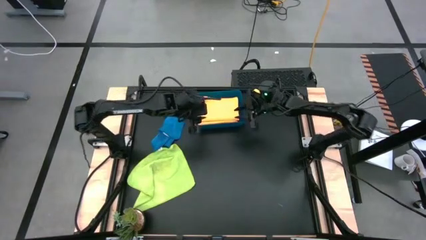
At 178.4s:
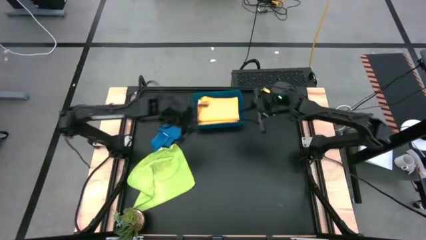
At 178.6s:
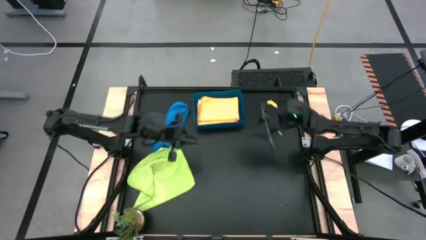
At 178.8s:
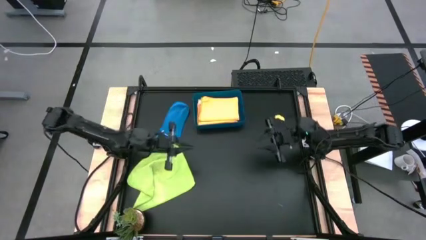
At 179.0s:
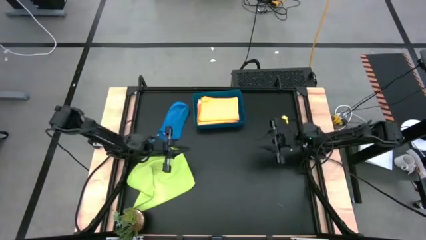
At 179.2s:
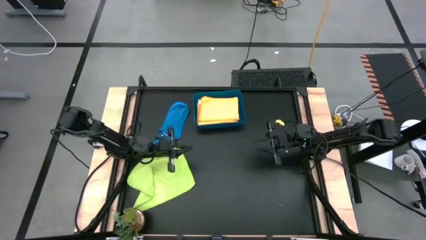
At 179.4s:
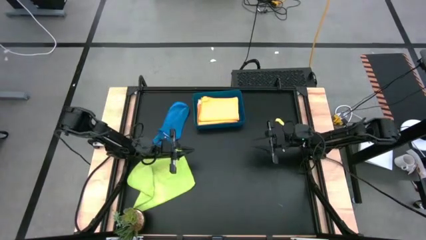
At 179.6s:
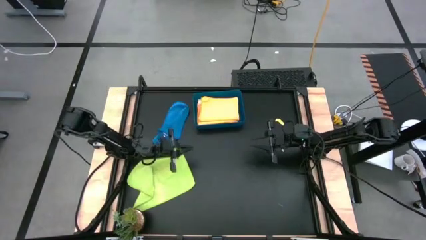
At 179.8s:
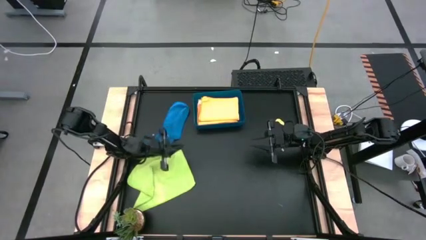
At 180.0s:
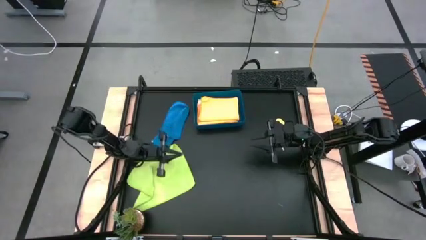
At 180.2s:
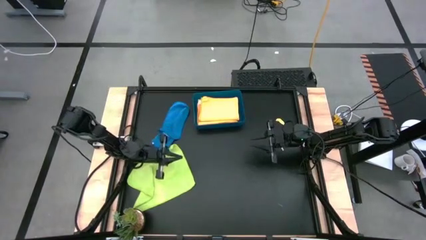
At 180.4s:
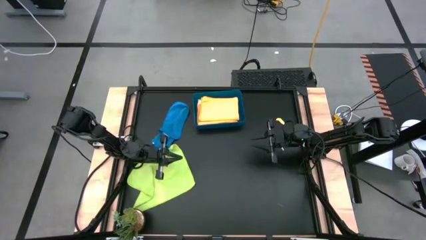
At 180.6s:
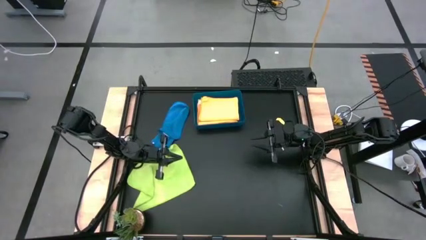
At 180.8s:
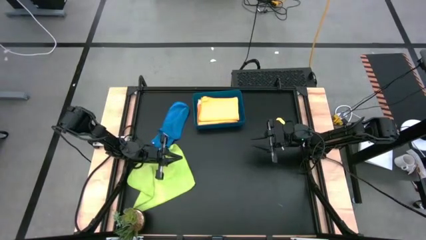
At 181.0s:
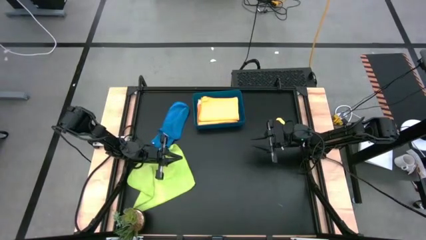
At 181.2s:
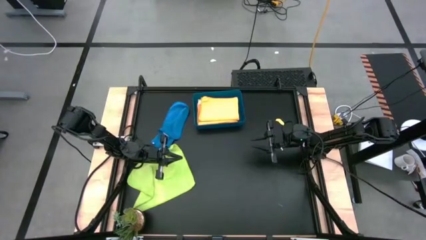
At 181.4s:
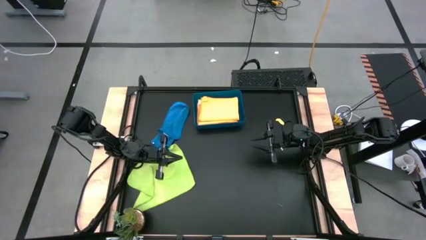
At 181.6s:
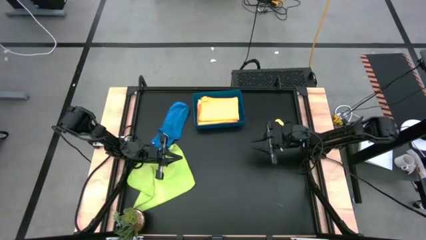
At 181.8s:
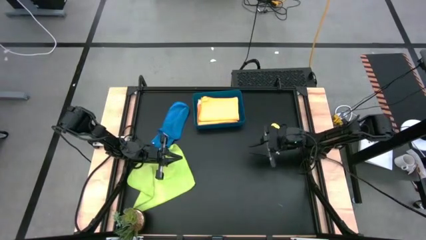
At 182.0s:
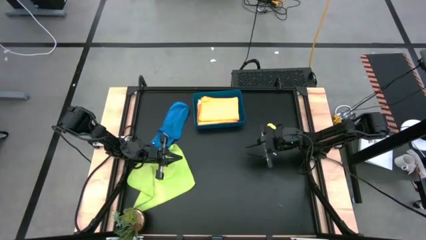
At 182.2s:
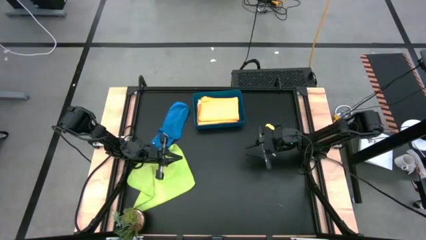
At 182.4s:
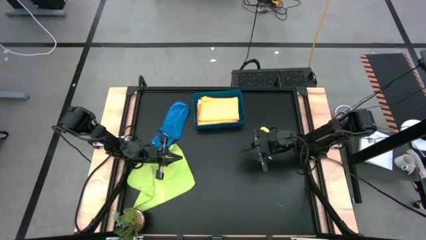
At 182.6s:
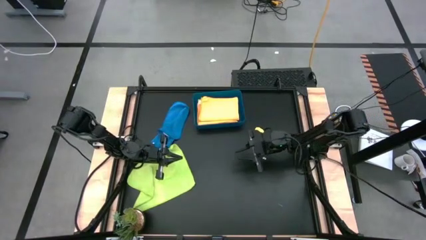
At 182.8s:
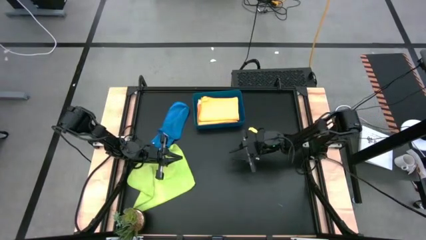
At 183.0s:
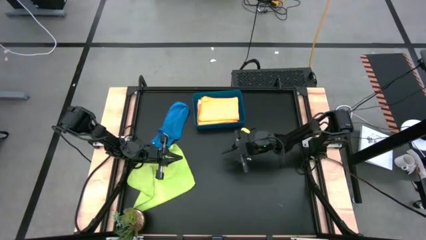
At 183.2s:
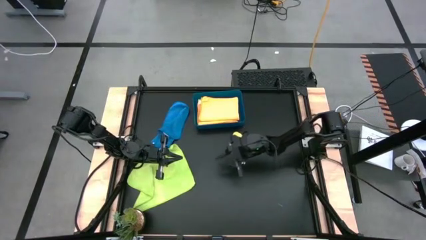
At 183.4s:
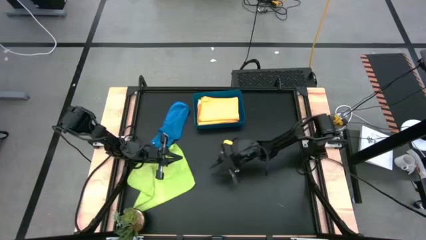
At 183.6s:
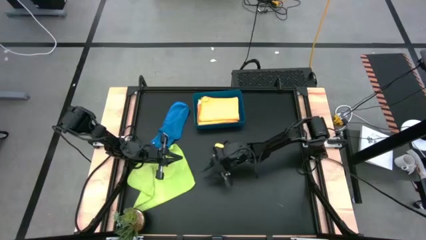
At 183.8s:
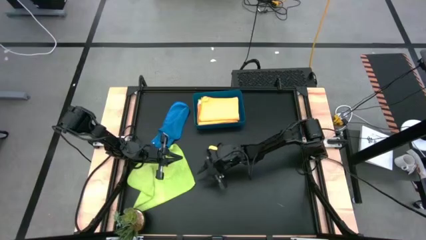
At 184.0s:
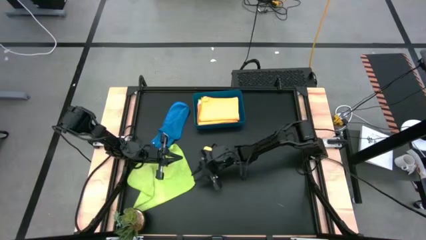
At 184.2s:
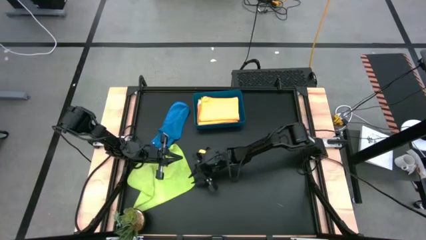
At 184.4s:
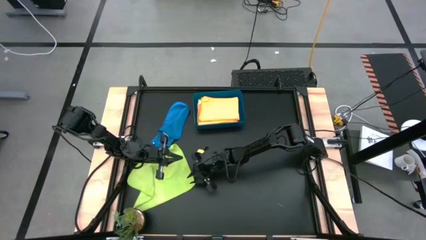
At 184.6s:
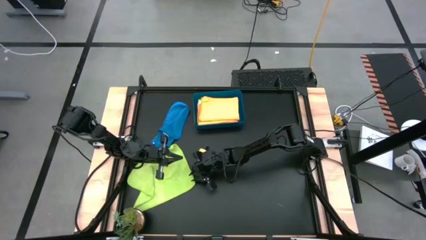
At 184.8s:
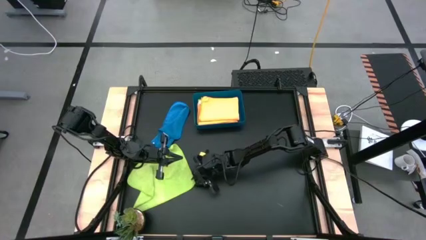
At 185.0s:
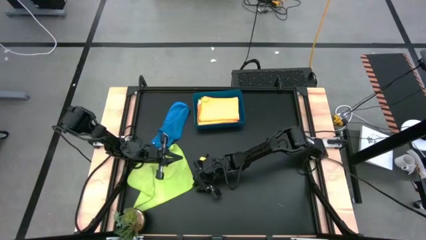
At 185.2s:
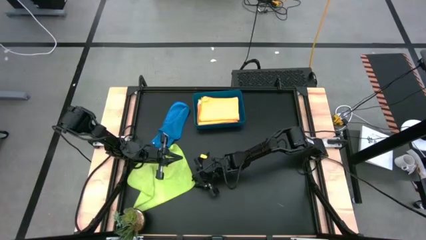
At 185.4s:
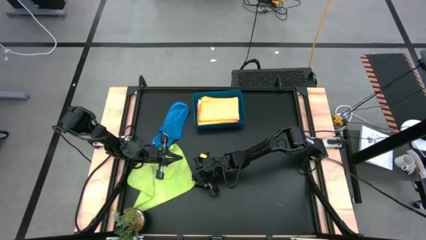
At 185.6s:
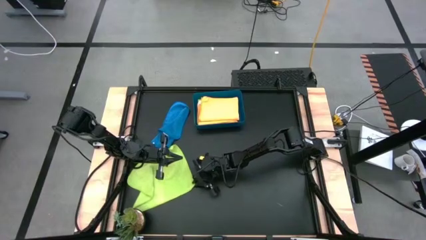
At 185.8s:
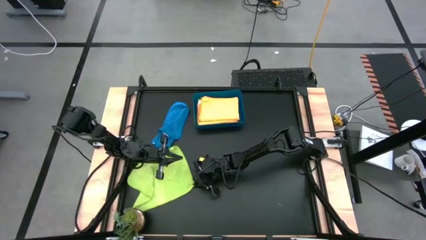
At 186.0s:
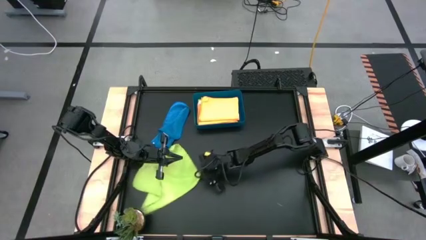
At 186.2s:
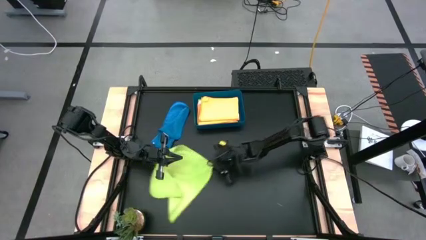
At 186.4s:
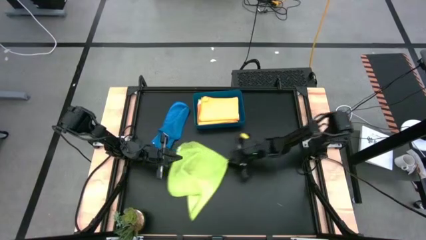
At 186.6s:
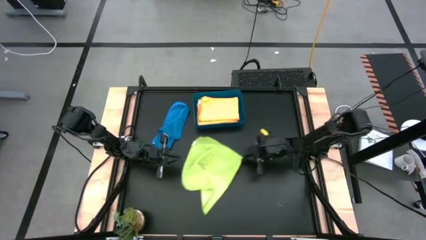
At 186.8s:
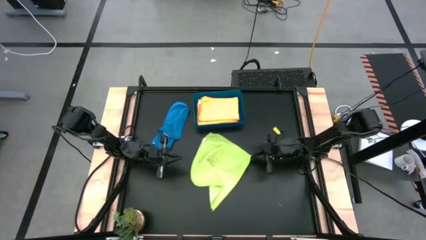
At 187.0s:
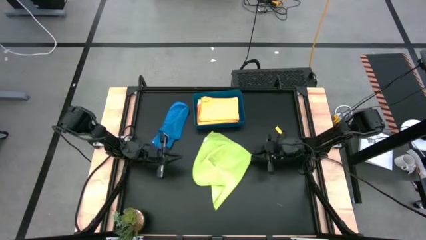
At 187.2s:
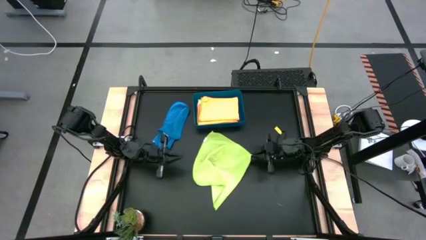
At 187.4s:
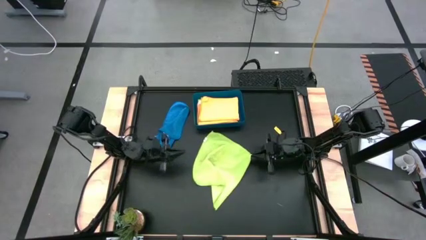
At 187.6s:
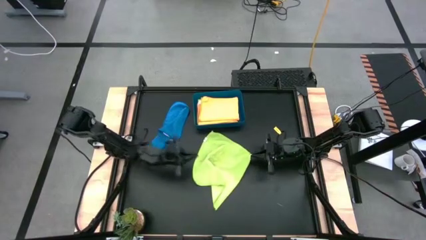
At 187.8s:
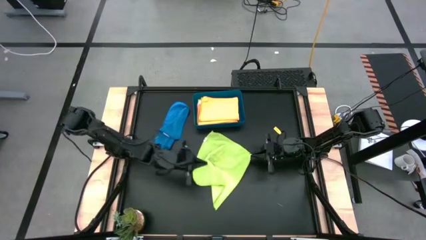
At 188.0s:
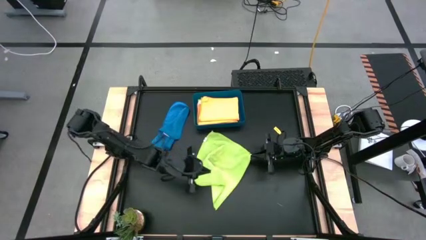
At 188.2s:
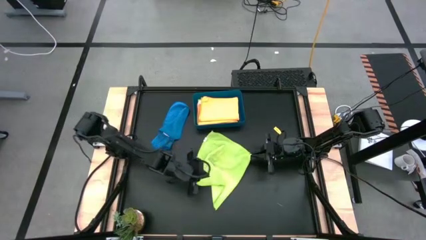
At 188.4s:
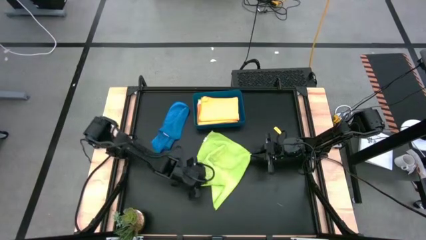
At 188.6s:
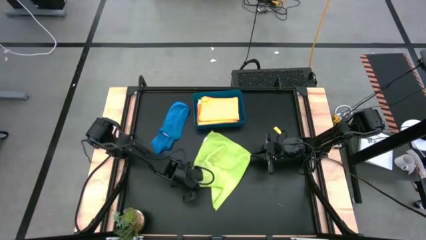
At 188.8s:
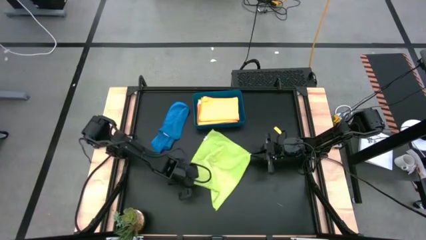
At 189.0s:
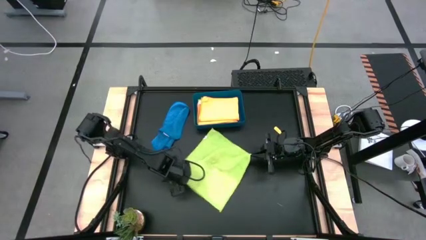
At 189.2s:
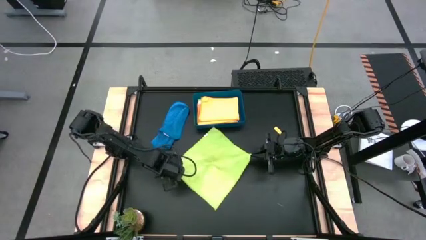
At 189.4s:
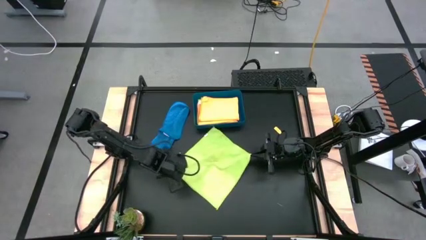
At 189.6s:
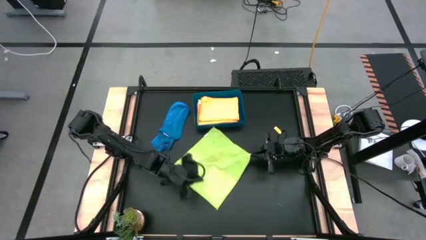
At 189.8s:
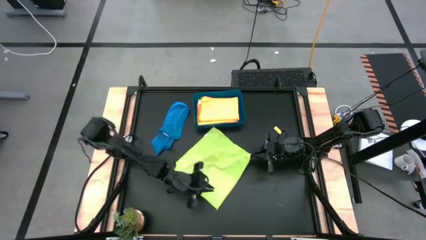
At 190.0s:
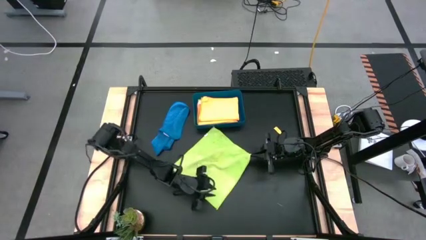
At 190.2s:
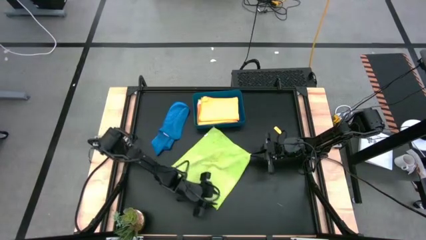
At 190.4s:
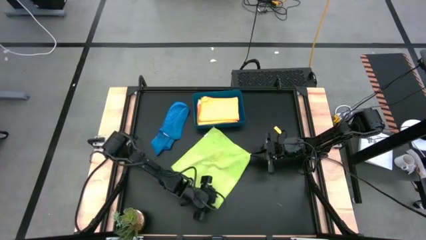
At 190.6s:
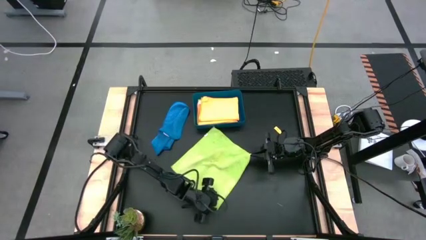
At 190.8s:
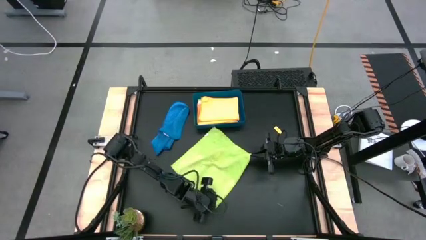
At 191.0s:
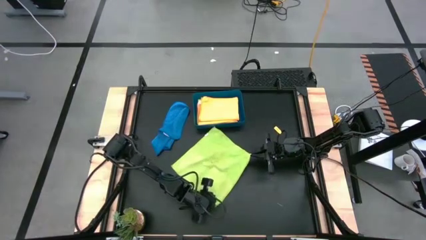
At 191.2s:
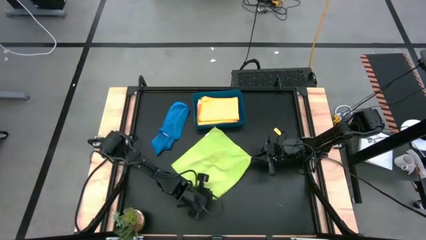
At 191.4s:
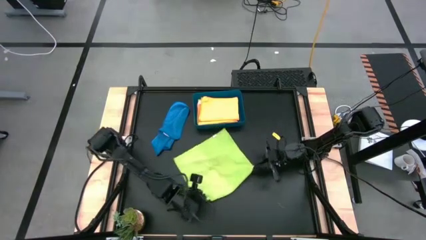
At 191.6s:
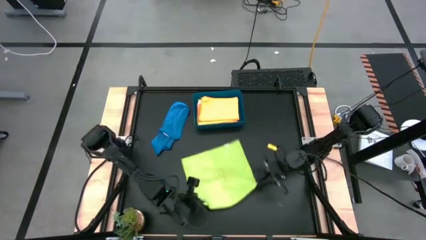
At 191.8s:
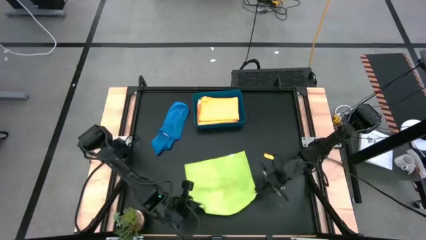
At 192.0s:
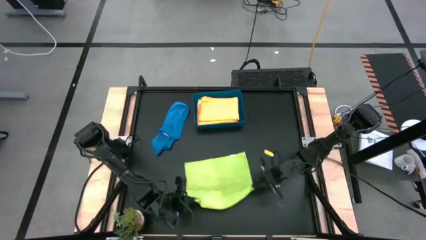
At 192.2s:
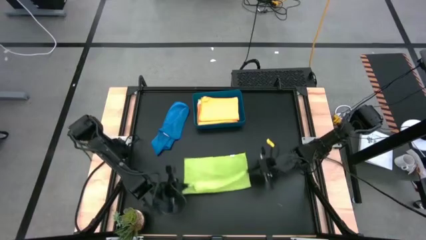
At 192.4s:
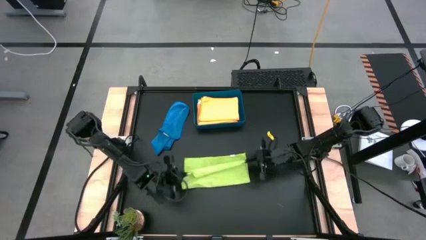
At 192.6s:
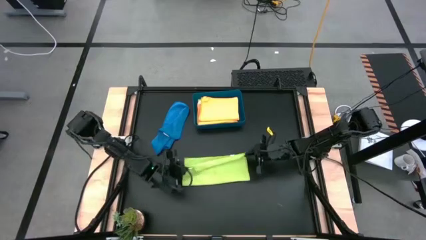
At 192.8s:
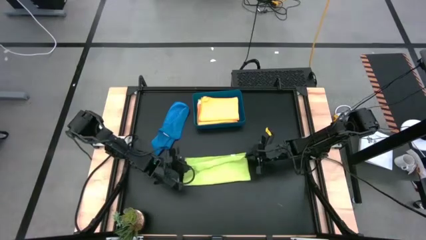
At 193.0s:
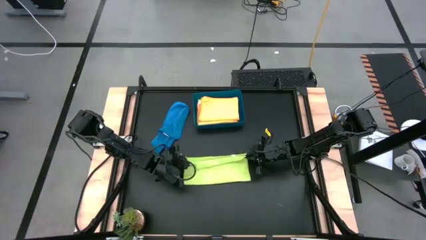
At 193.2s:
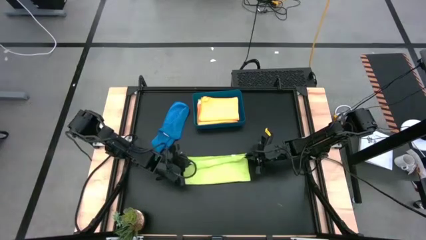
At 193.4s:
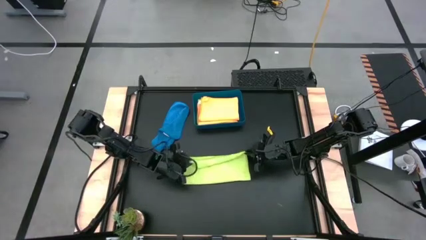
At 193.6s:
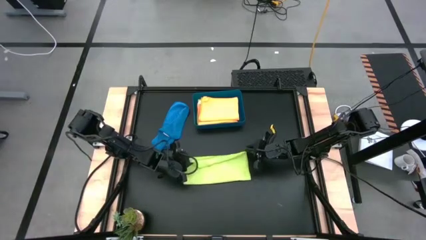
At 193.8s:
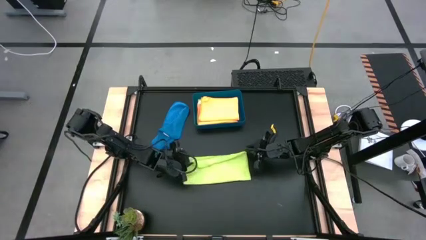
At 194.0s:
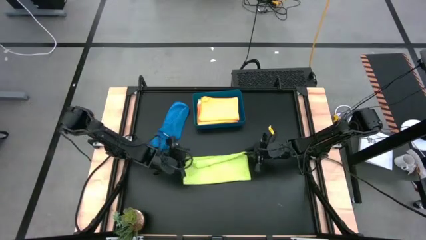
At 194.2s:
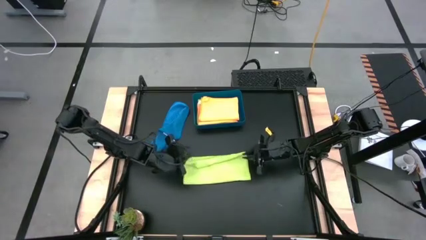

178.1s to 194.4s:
Task: Fold microfiber towels
Fold the green microfiber cloth
